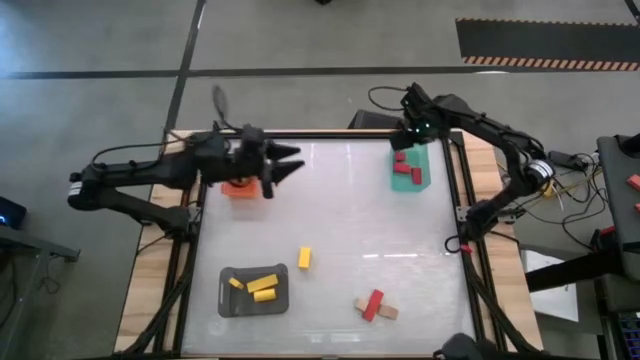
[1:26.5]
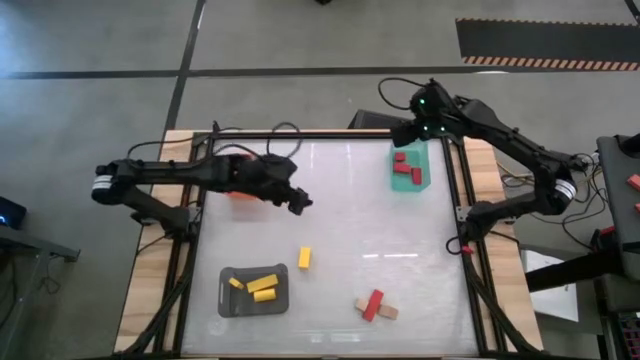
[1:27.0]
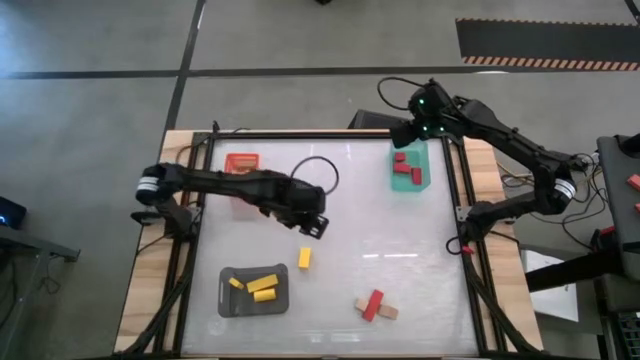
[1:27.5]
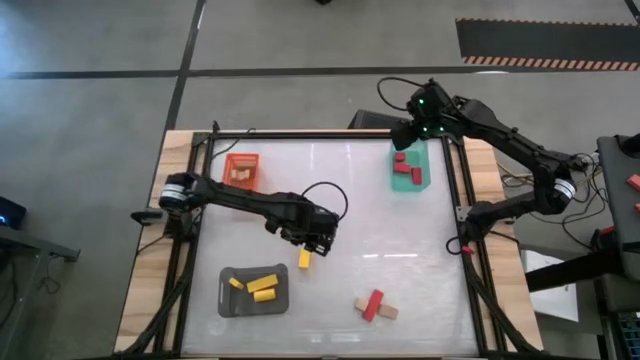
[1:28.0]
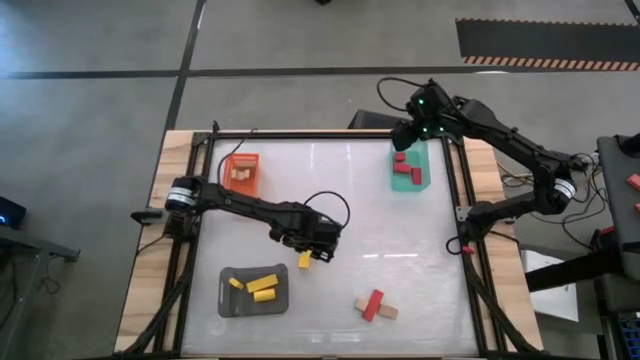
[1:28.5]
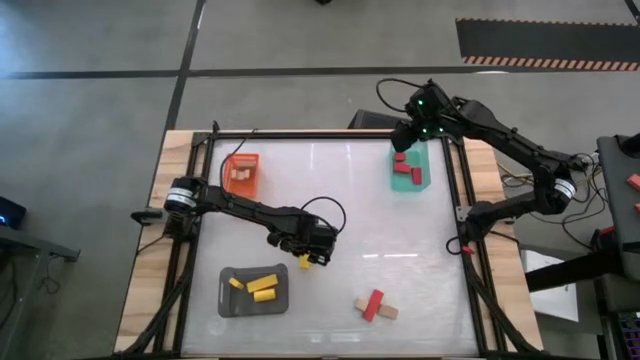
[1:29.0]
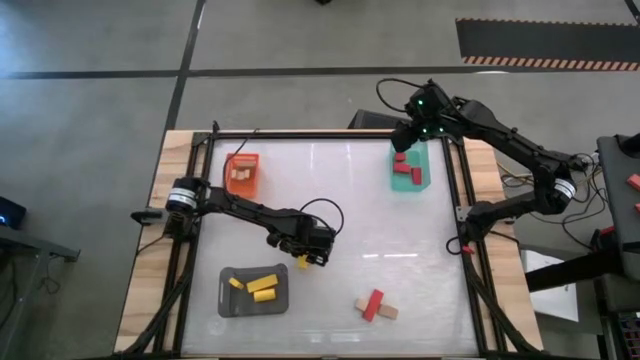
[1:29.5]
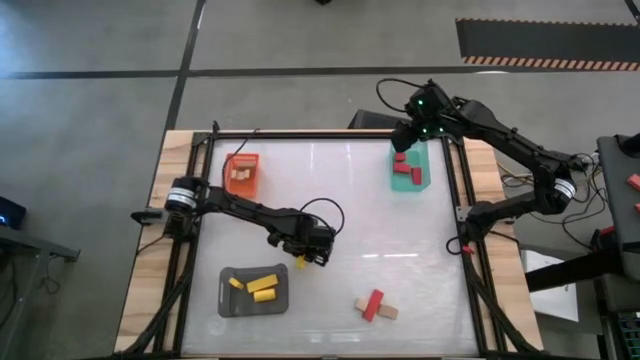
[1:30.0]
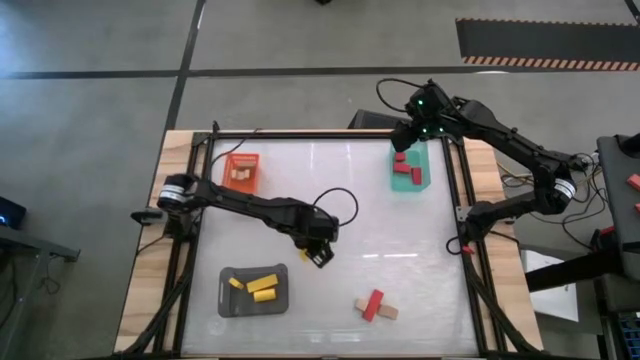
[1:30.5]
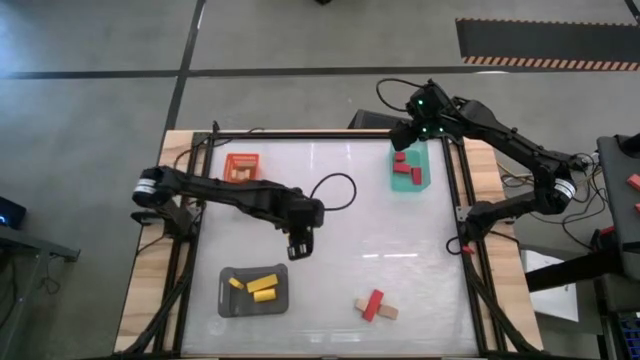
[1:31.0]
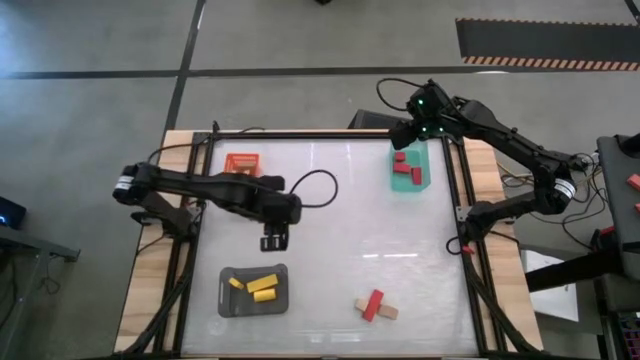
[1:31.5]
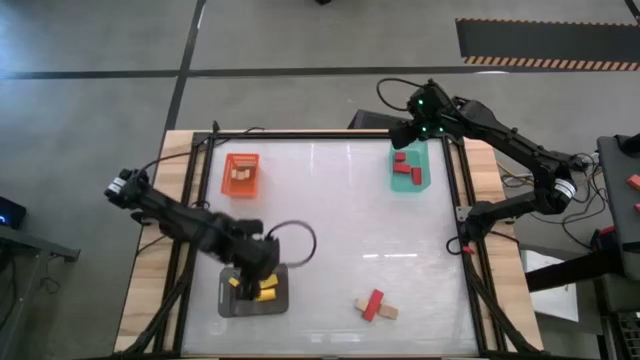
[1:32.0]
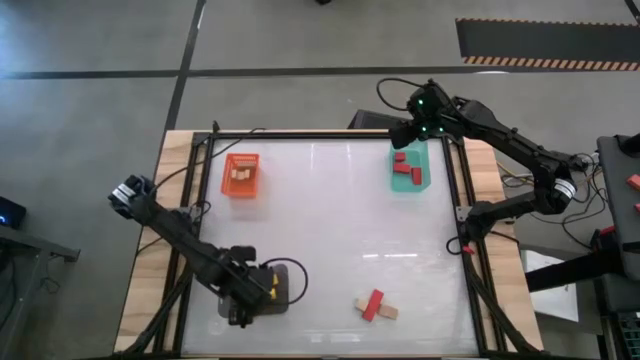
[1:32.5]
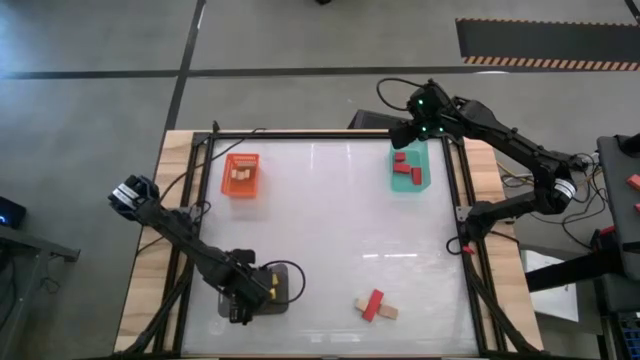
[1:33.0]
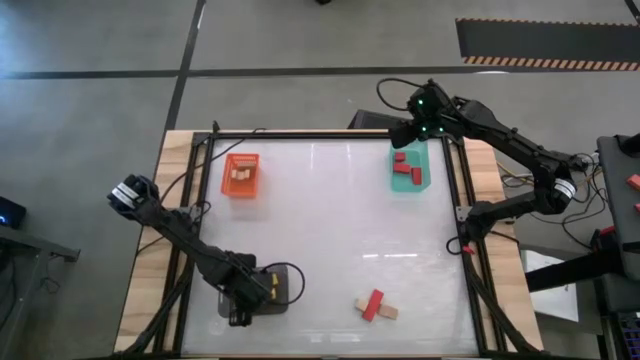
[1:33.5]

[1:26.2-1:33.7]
Task: Sort & place blocks by color
Put the yellow block into the black bin

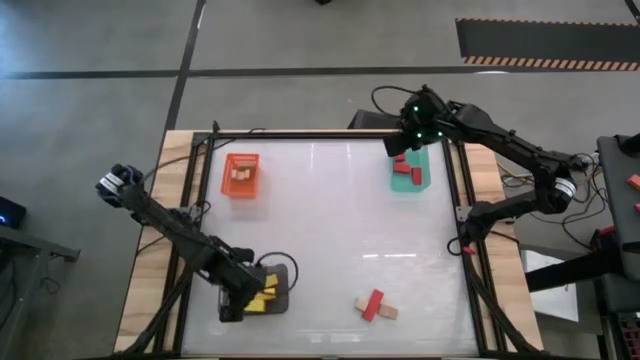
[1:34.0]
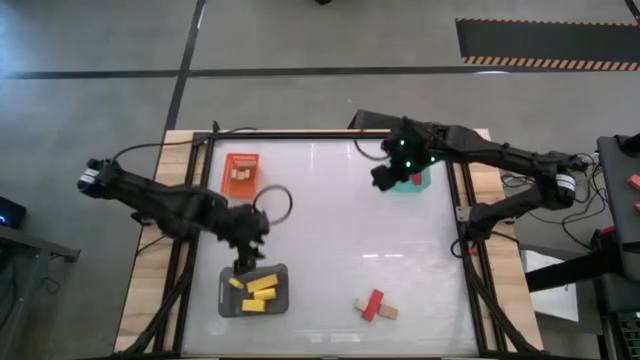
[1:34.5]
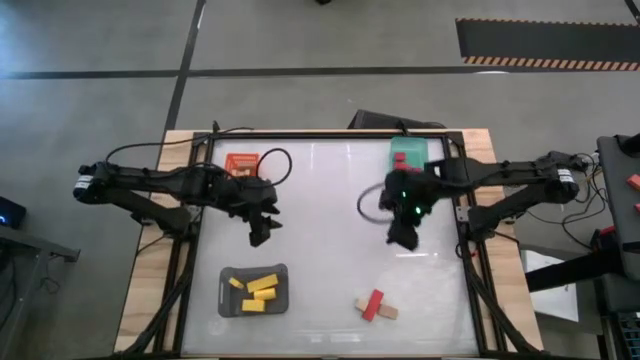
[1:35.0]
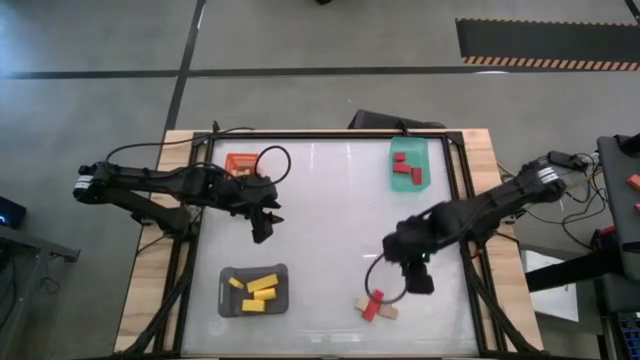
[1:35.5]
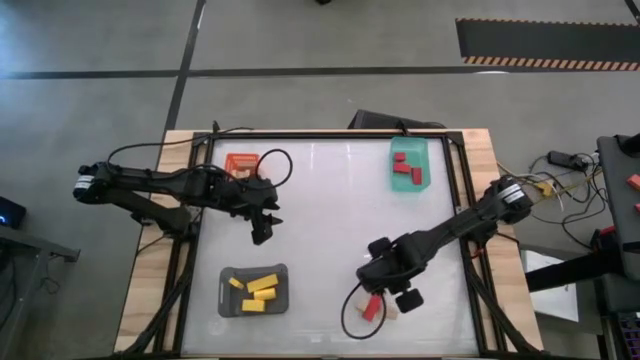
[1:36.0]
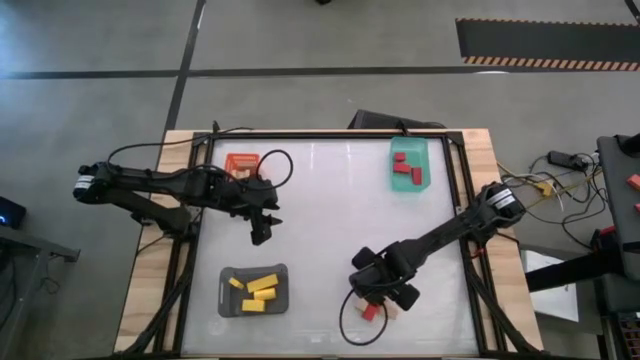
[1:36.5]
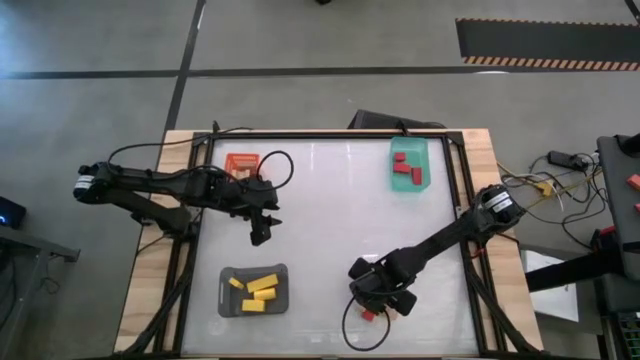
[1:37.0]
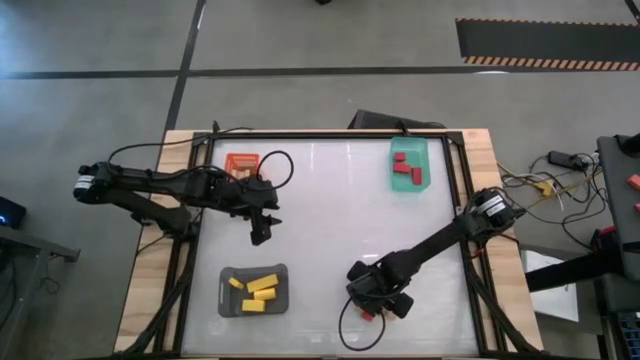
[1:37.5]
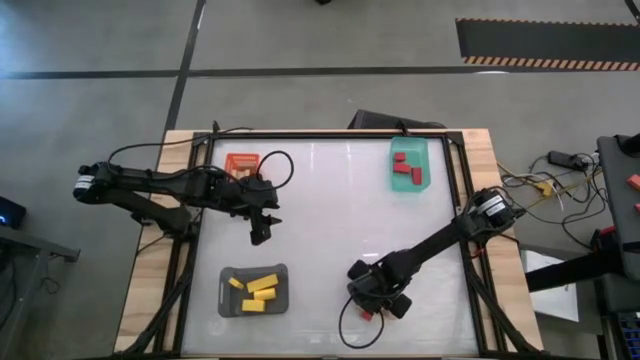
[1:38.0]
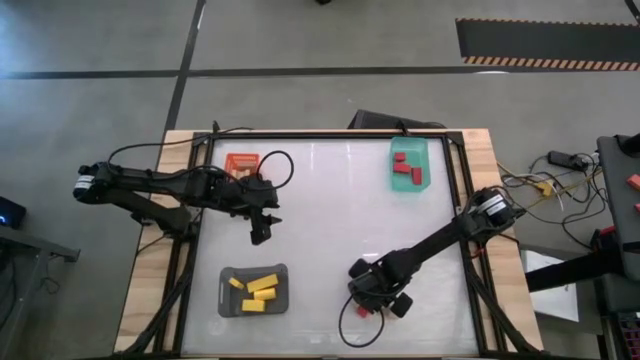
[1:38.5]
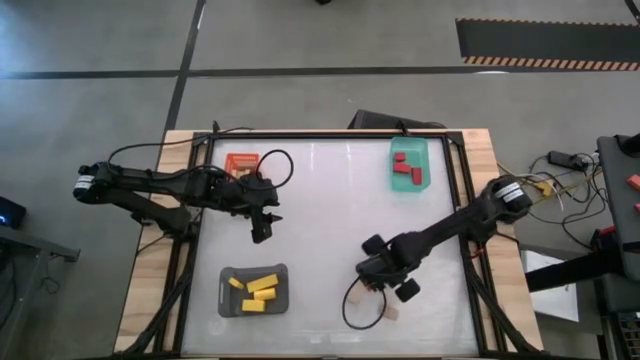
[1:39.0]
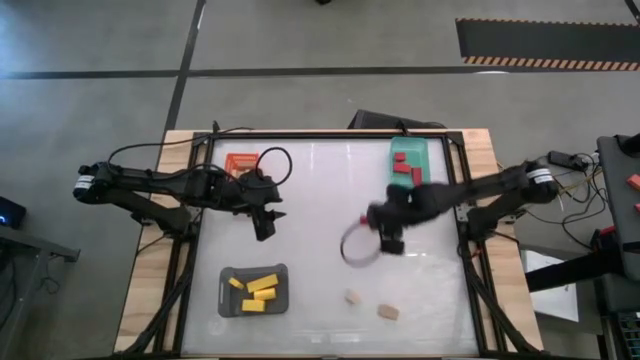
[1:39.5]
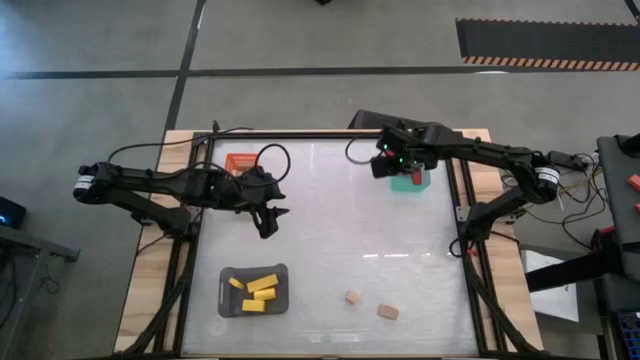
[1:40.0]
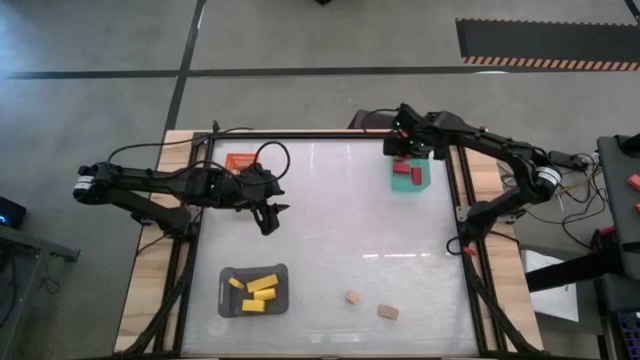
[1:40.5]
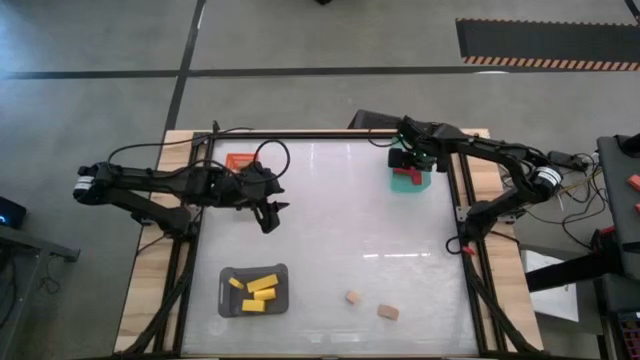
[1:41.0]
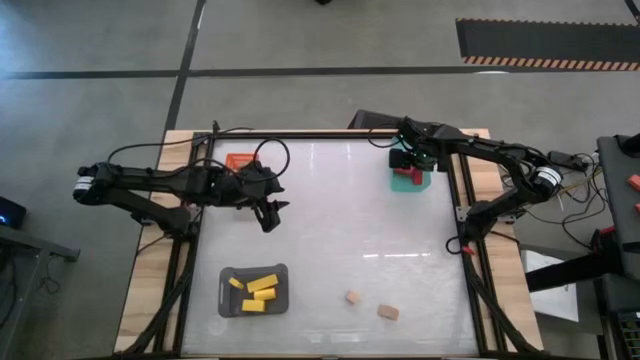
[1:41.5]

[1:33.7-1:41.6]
Put the red block into the green bin
